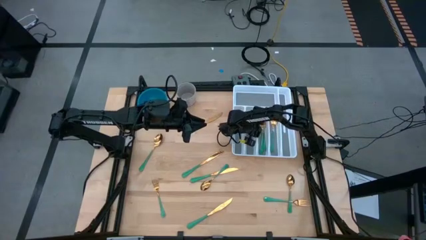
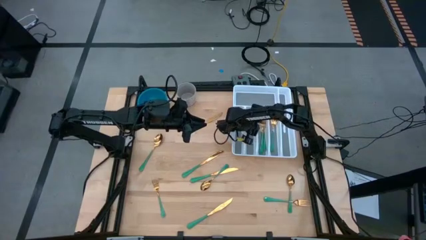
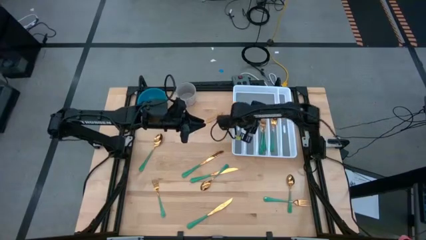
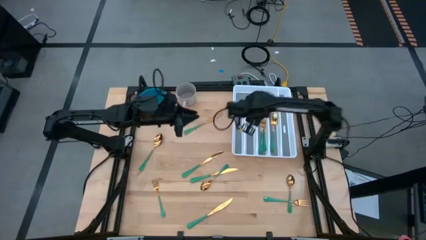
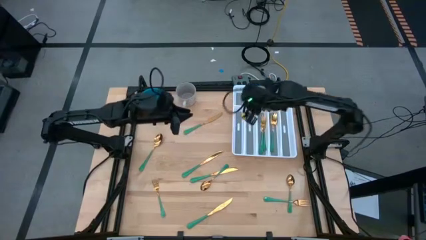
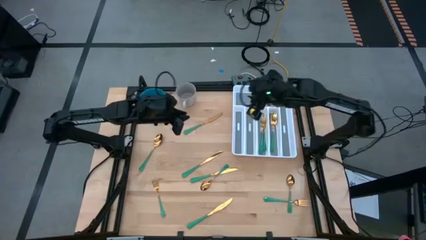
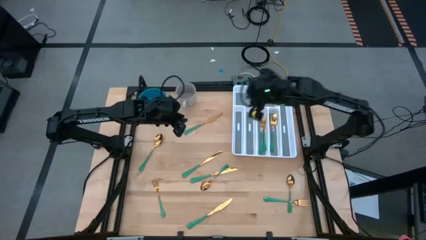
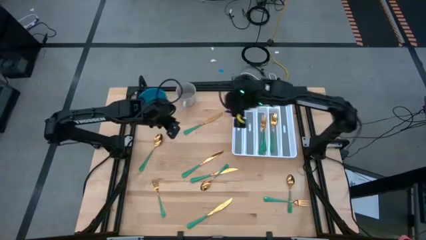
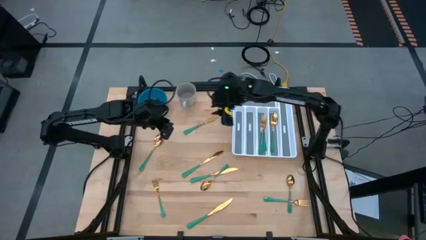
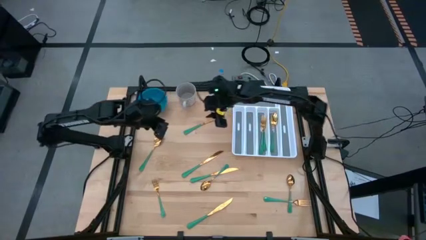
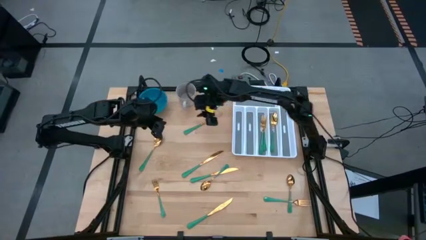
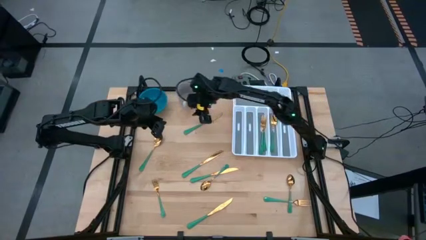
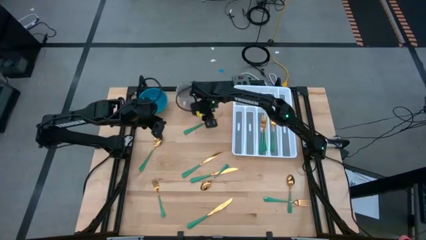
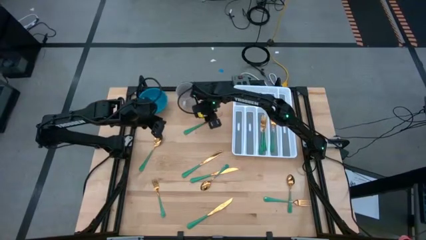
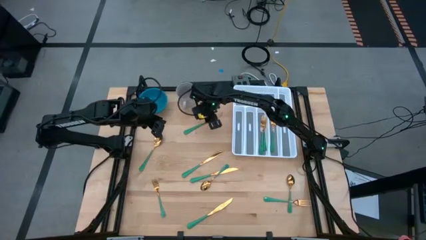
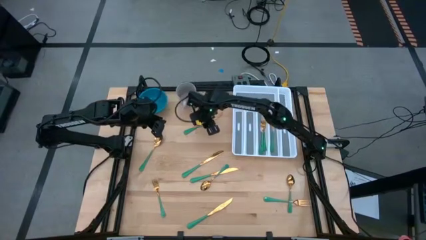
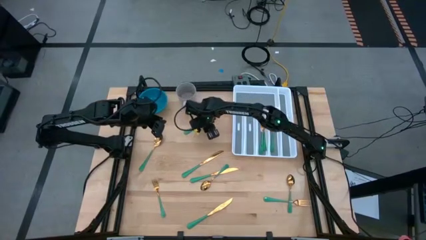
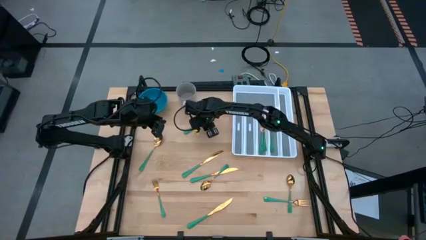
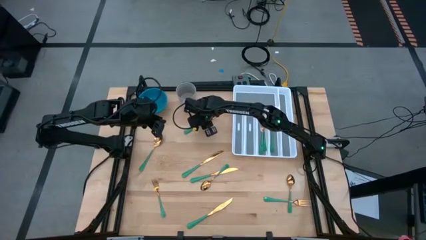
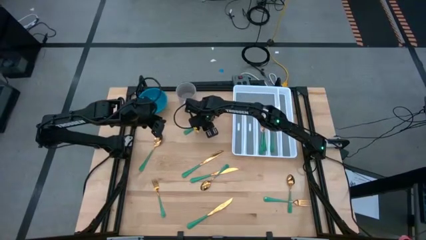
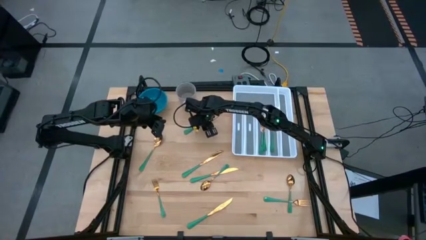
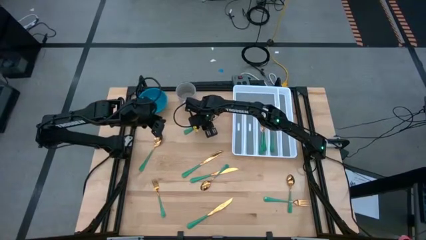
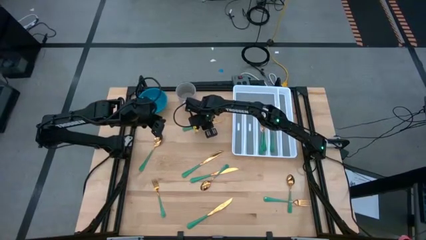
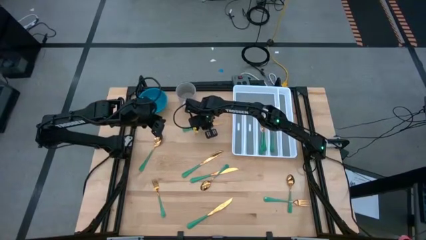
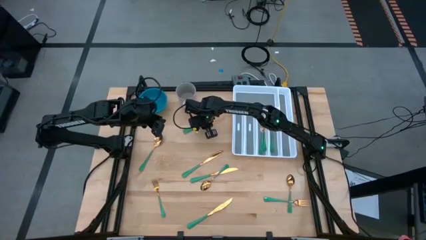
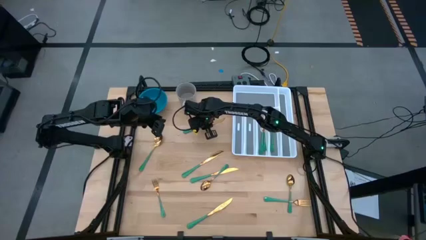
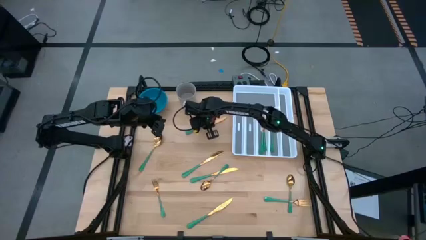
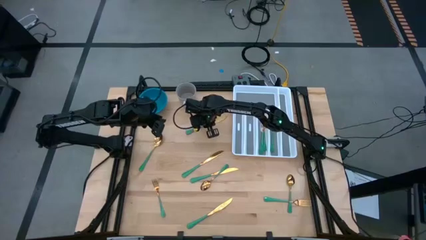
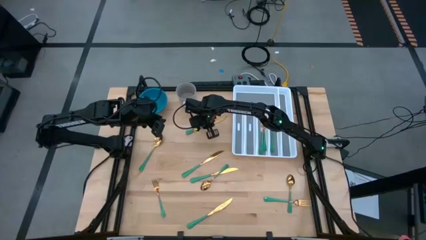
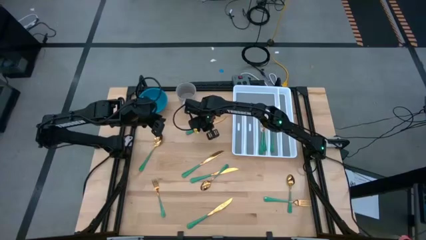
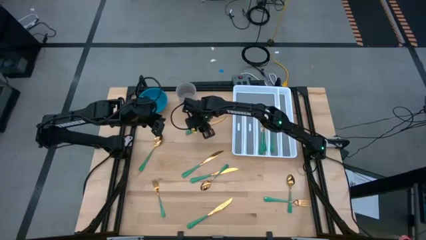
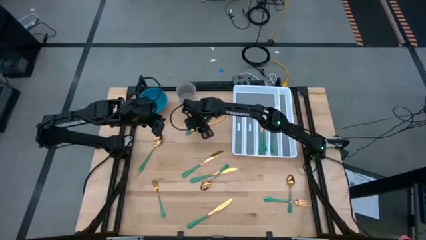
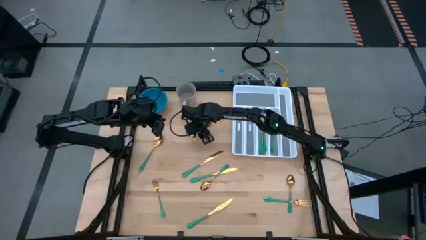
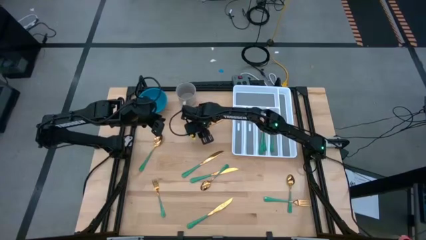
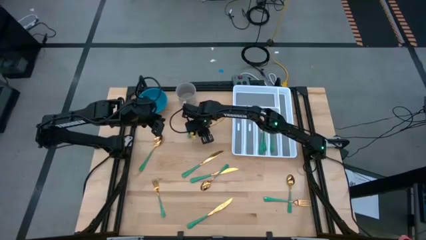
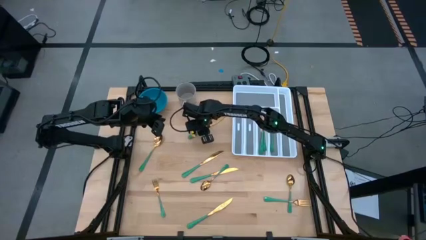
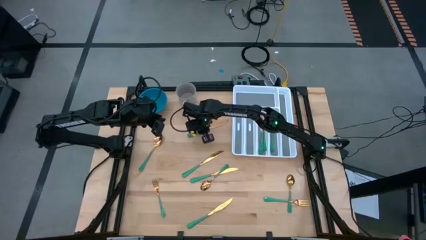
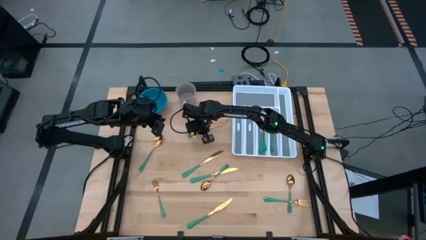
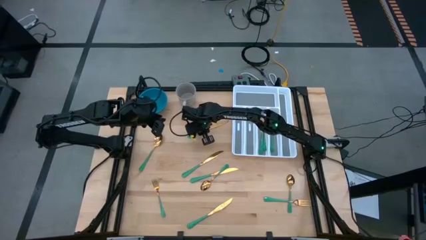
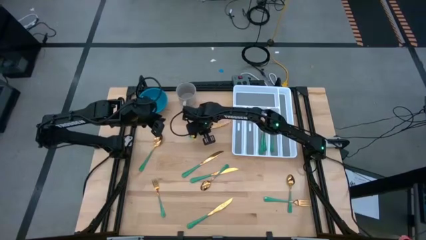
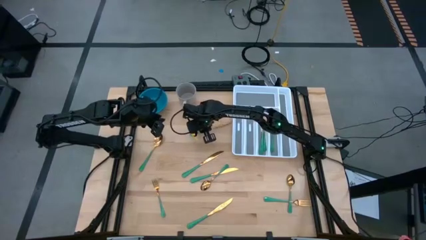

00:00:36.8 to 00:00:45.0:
Task: Sort silverware
Put the green table knife into the white cutlery tray

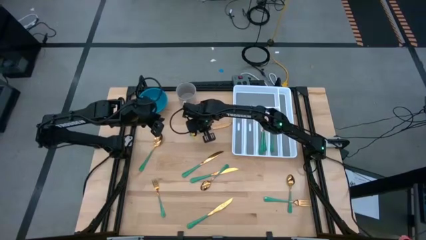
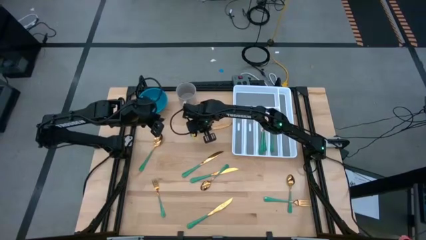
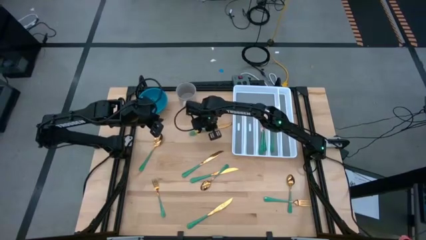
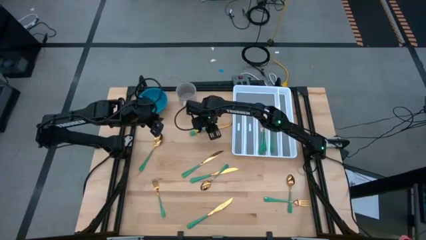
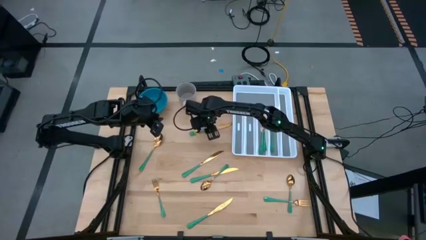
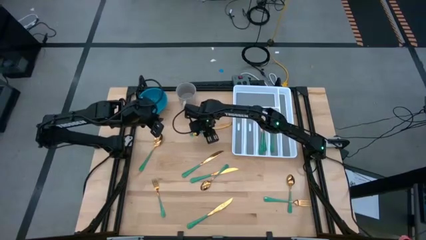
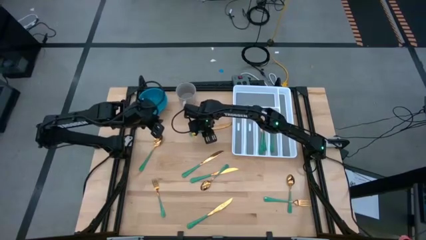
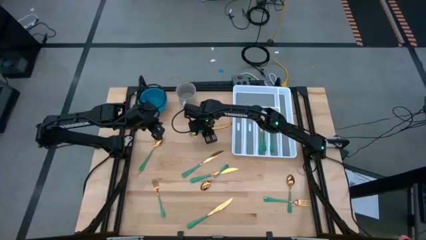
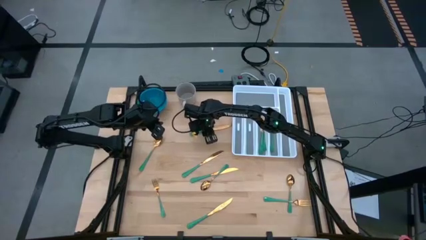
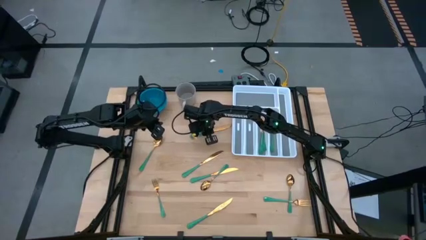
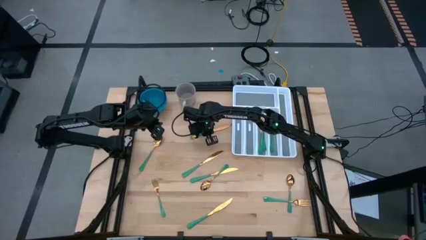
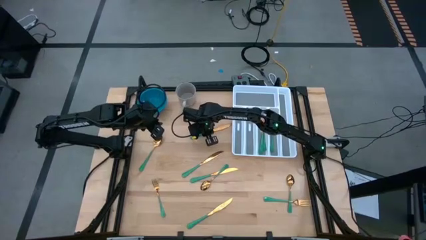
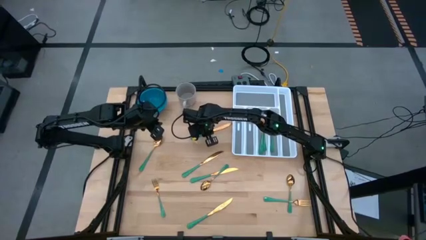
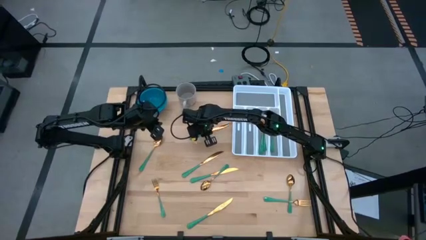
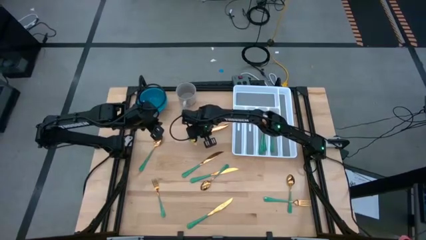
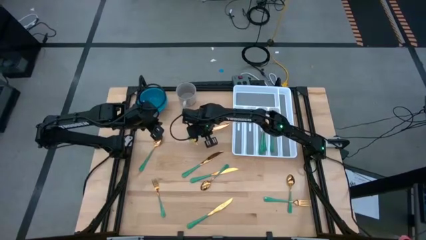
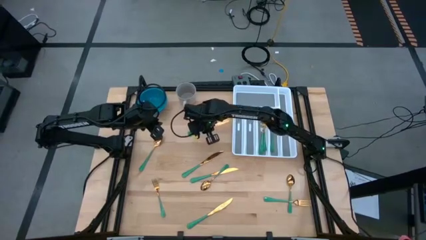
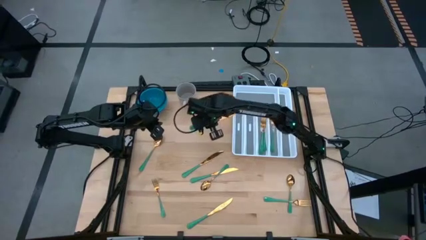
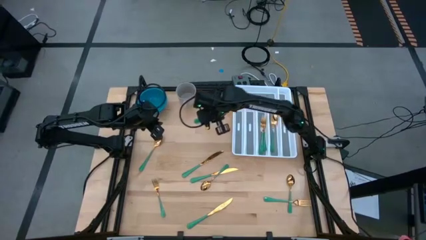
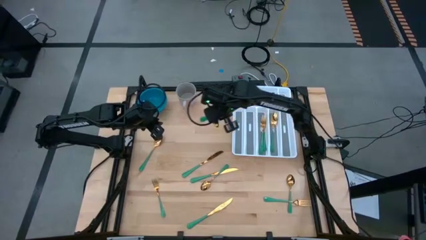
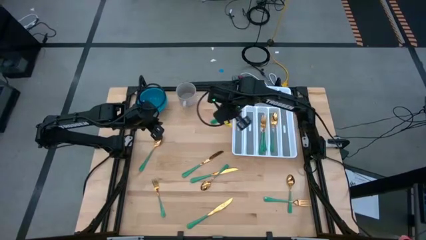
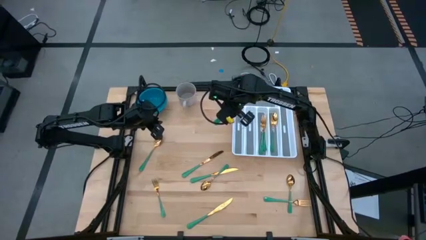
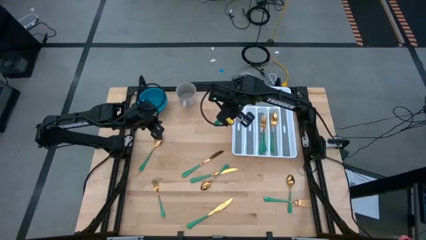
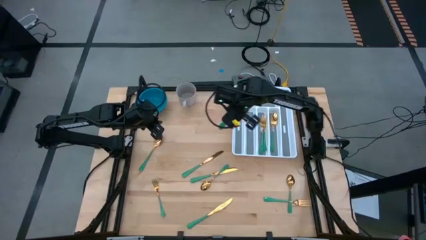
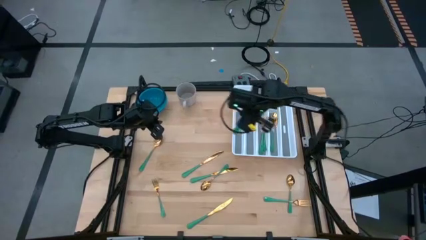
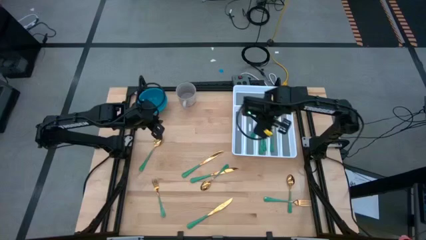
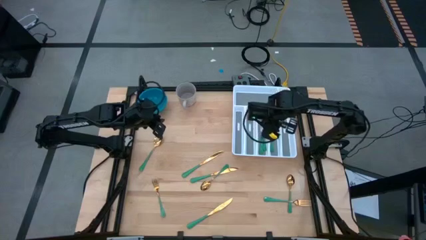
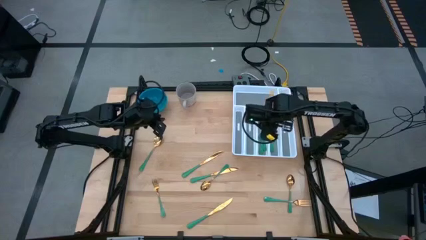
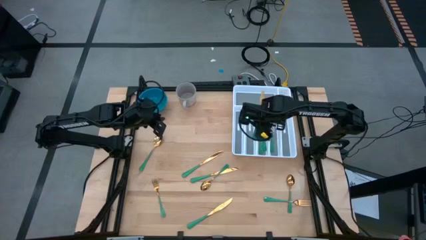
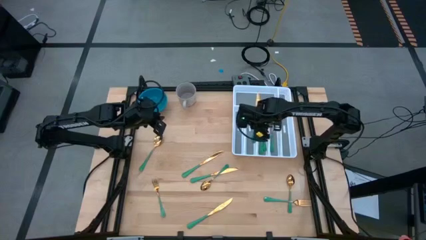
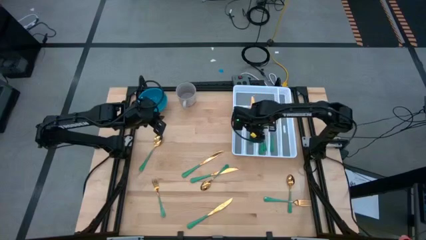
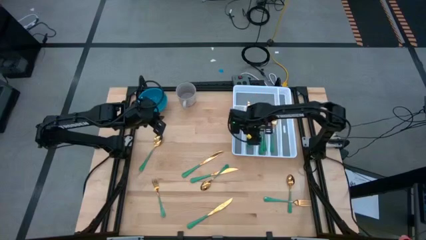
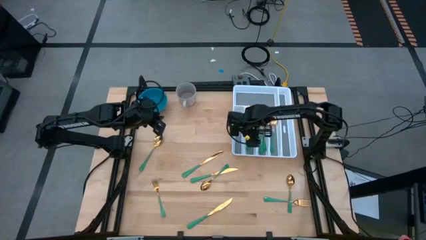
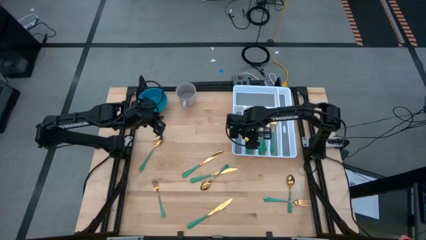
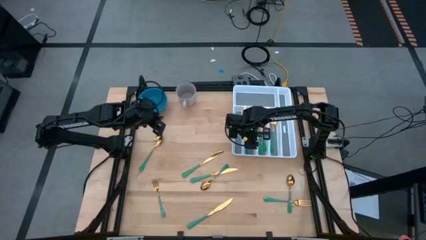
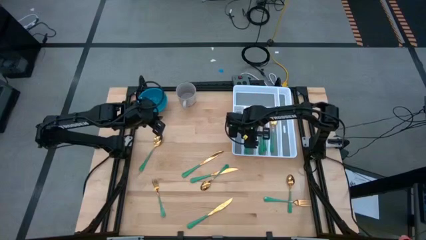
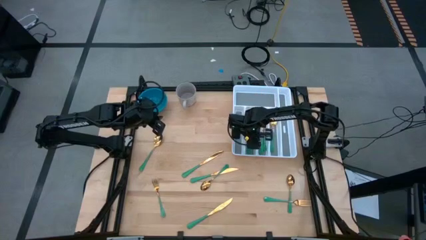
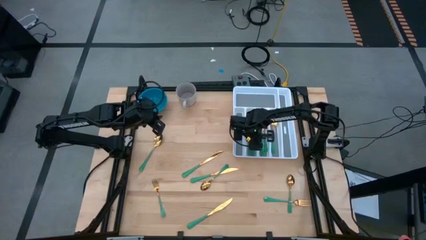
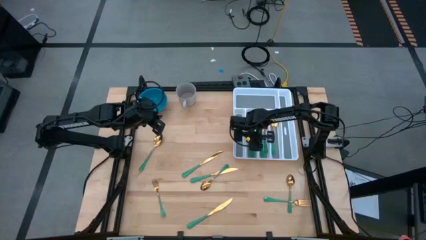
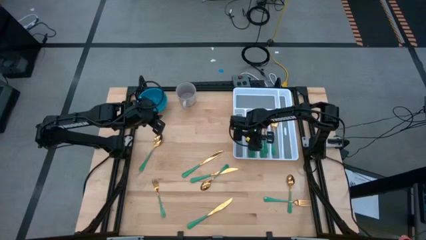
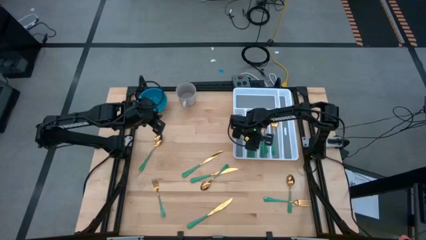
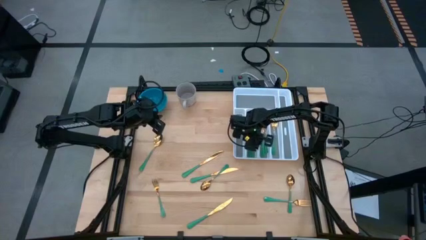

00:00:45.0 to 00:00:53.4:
Put the green table knife into the white cutlery tray
